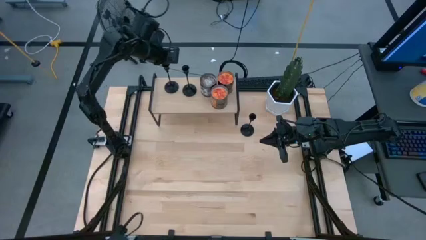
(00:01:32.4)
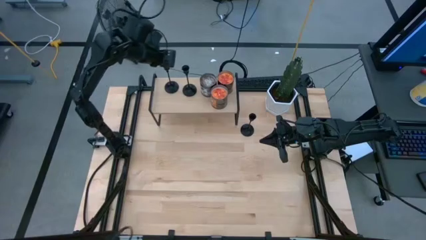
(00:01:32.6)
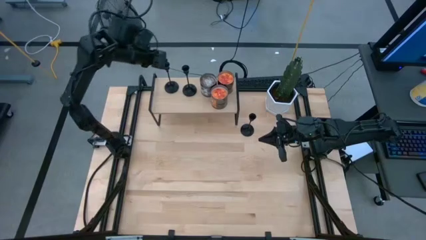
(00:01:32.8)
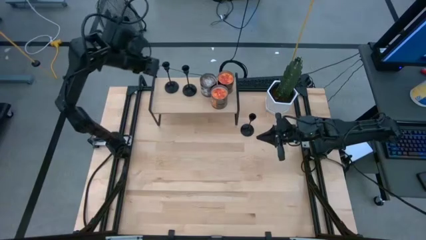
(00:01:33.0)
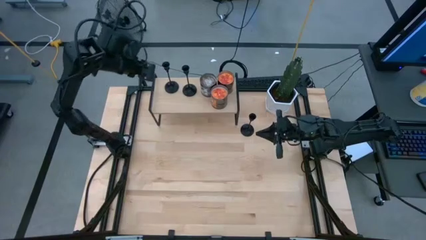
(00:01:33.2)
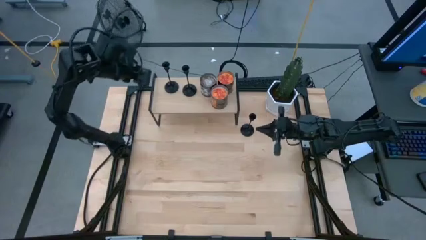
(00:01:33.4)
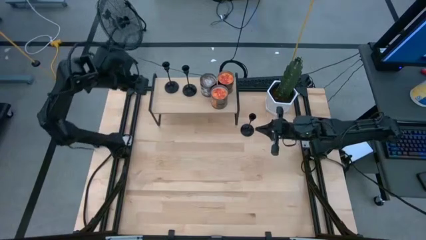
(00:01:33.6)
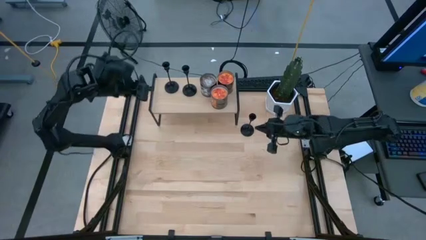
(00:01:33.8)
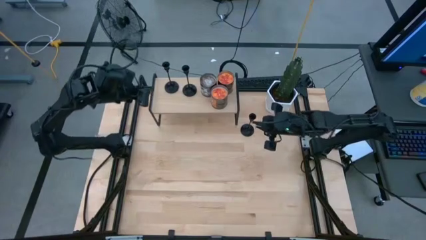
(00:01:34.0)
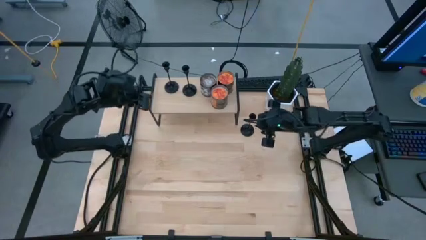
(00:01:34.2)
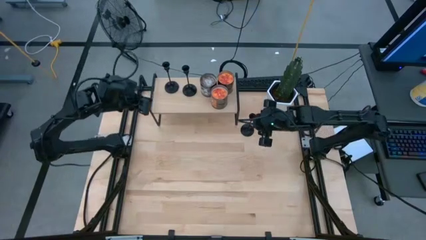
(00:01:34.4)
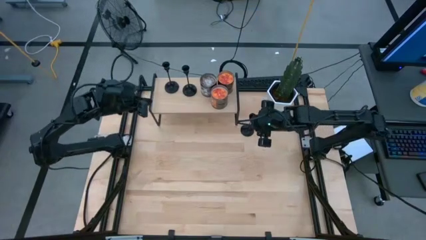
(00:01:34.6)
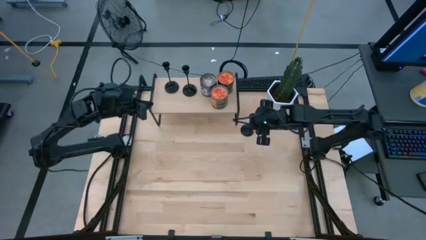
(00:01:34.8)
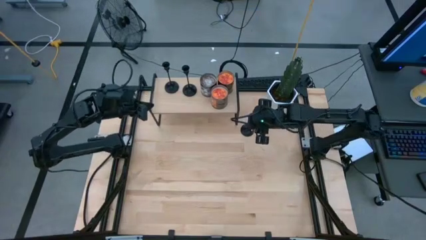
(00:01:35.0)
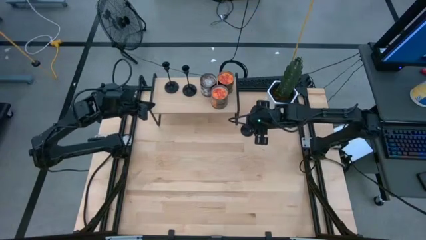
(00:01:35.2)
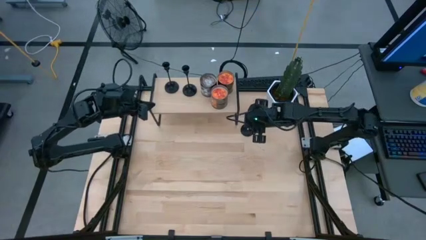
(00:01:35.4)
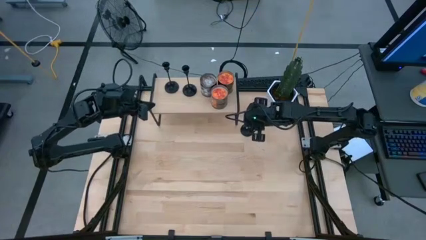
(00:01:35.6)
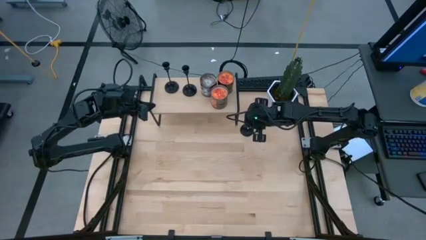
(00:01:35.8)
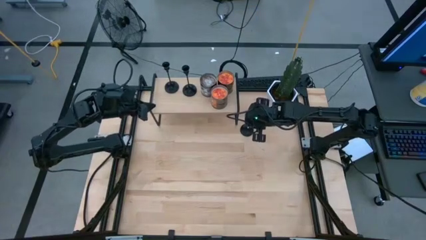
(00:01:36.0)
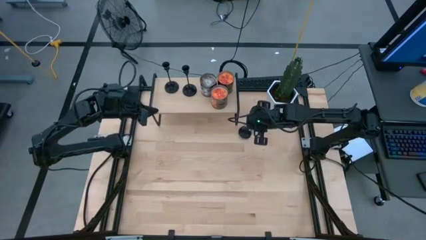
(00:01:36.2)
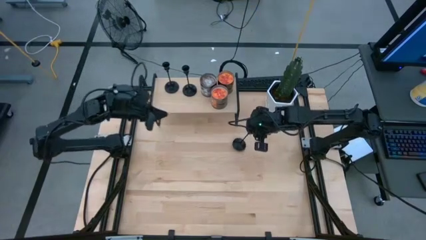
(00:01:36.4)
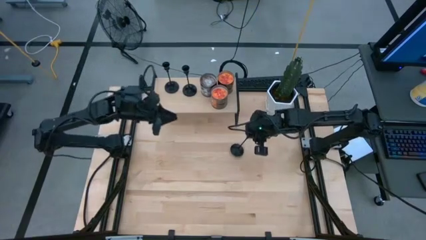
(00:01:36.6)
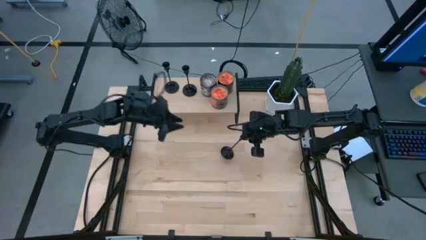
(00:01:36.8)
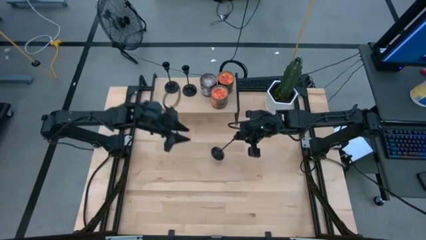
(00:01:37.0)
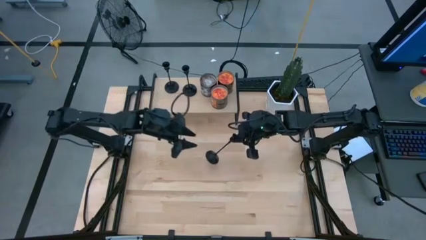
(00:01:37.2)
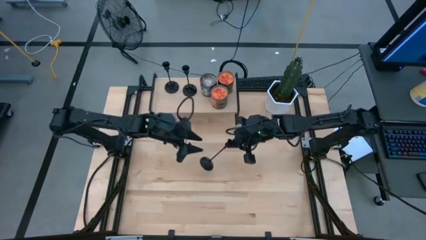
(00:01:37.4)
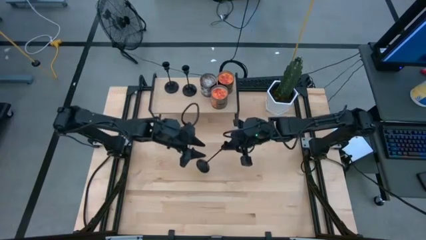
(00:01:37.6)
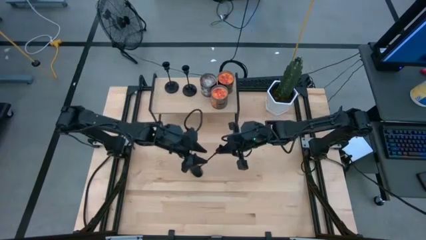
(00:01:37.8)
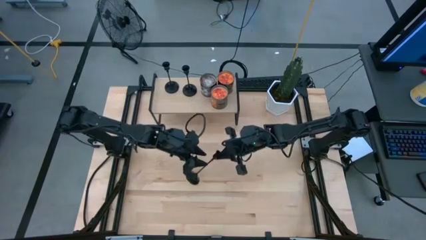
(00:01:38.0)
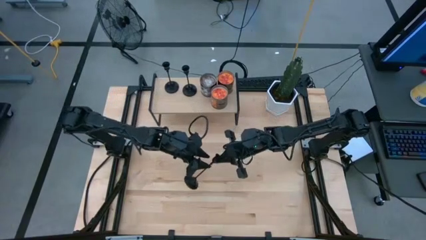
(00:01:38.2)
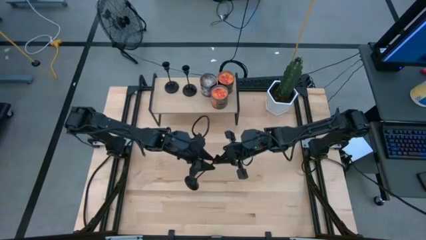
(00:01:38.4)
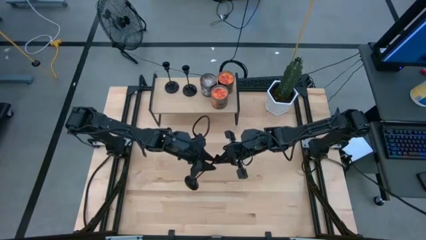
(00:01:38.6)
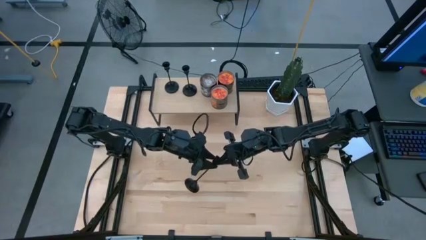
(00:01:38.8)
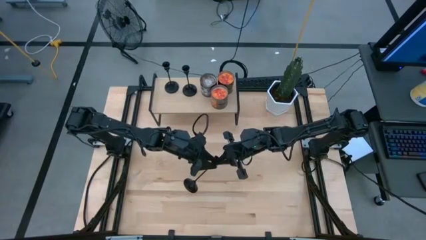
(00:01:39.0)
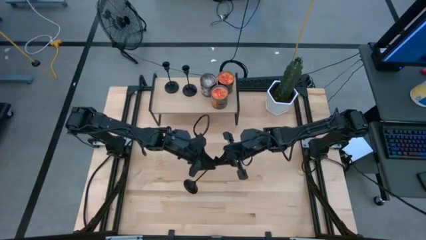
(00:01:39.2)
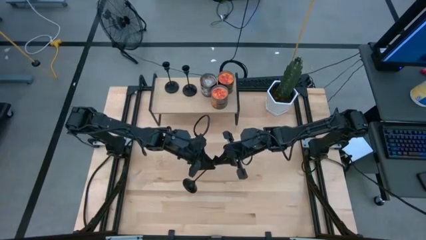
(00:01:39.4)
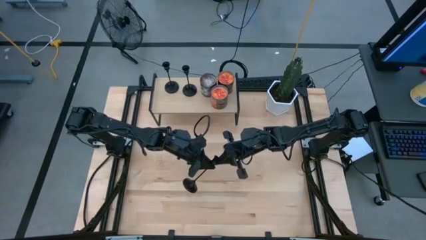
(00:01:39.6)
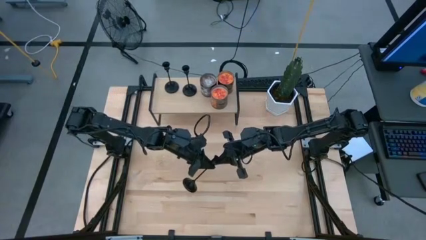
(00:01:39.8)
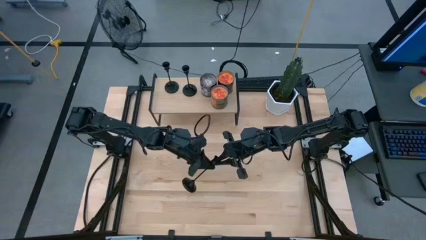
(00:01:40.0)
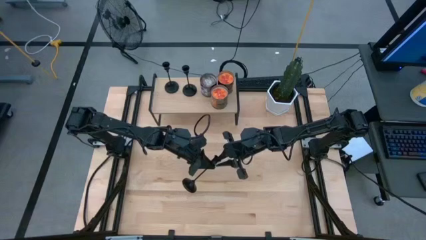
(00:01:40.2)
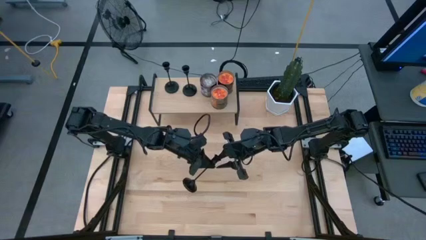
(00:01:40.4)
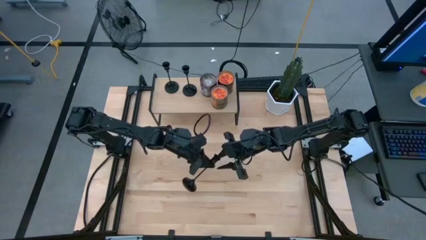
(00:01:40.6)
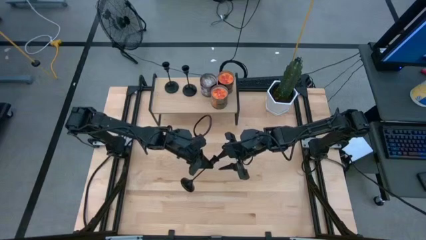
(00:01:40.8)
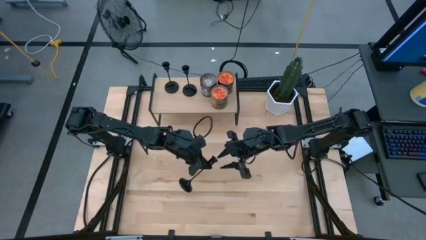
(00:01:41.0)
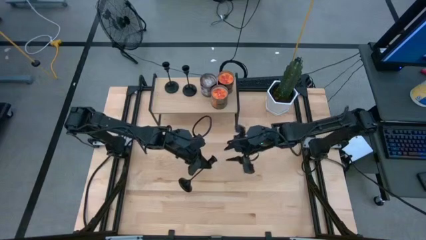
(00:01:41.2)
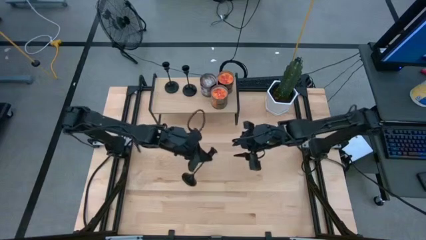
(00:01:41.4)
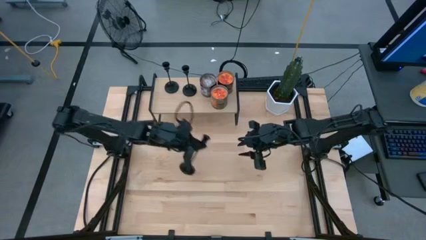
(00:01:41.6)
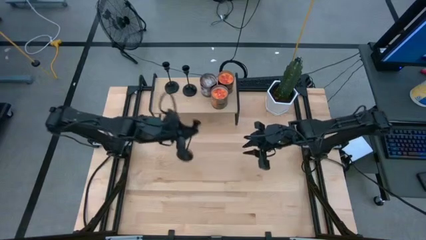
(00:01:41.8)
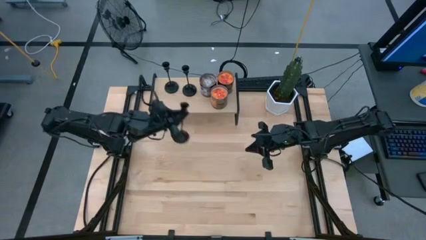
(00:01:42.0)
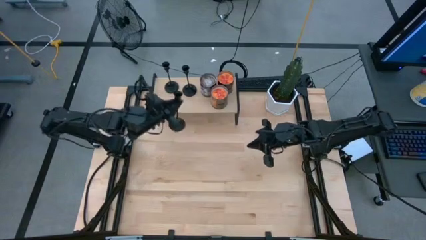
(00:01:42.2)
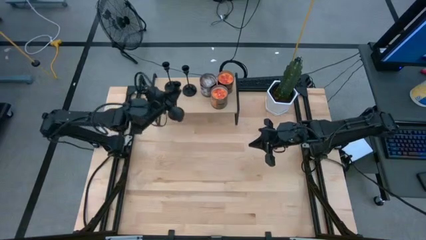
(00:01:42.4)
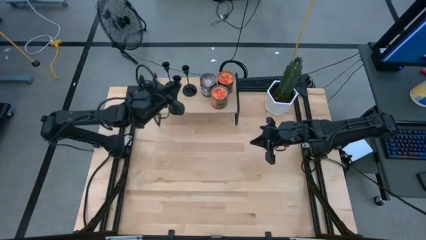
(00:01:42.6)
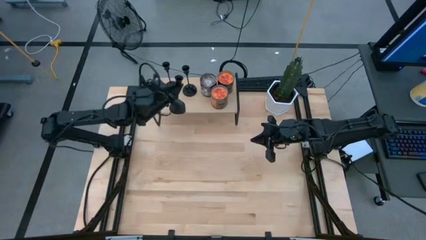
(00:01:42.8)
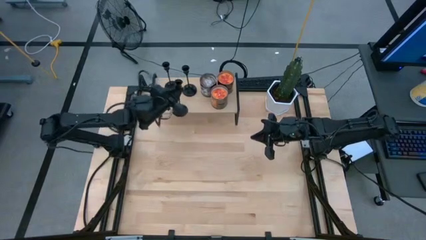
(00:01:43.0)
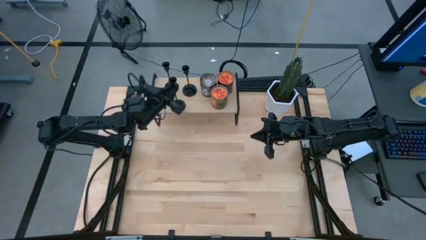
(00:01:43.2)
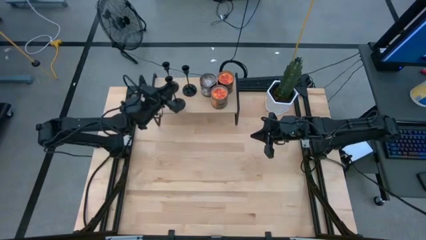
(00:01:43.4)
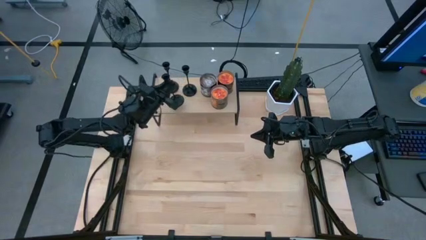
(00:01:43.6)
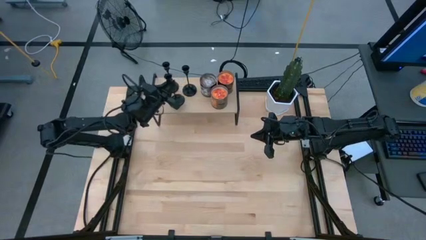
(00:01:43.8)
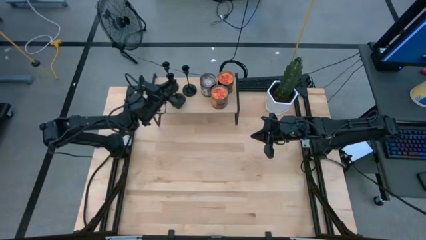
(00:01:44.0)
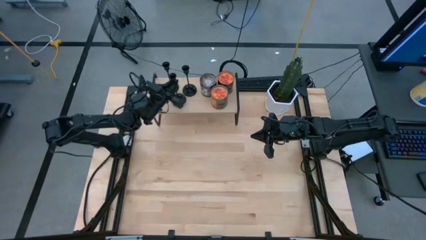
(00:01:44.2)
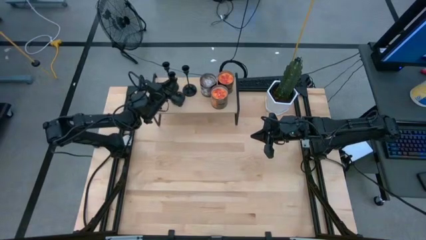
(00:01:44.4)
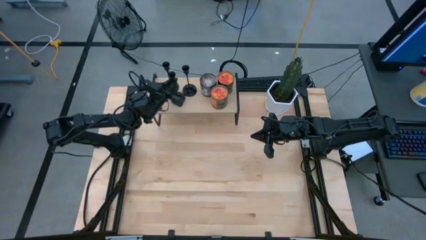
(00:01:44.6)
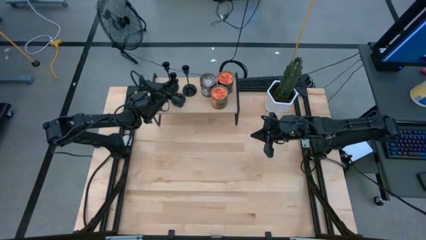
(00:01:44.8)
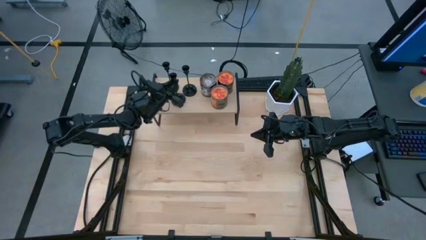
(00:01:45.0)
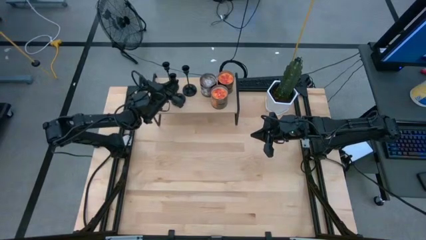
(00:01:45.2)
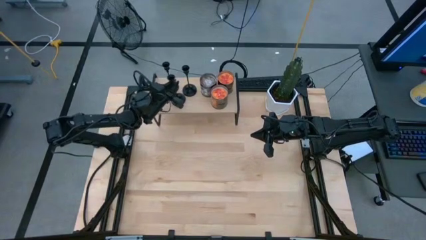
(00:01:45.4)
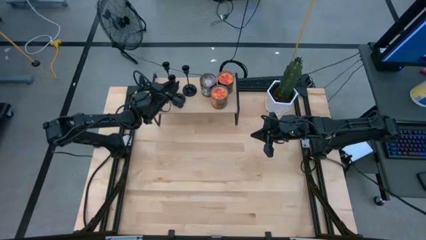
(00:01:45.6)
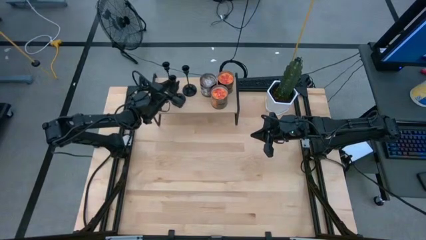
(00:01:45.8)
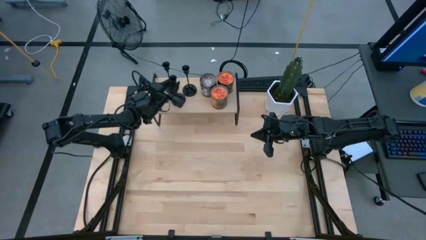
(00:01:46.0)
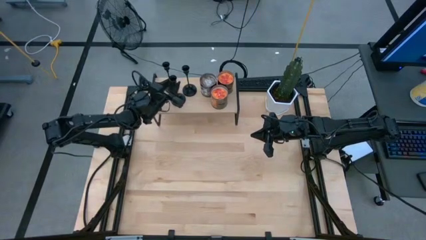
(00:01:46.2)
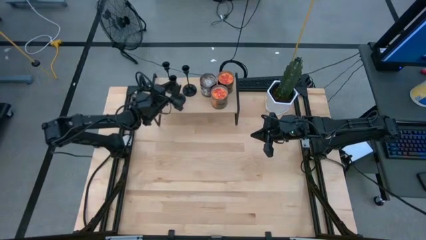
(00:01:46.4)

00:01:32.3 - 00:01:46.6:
Task: Pick & Place candle stick holders
Put the black candle holder on the shelf
